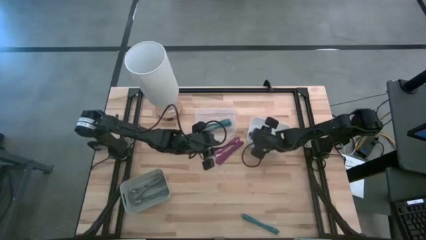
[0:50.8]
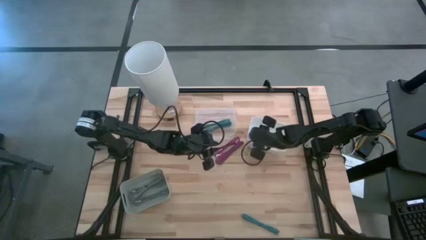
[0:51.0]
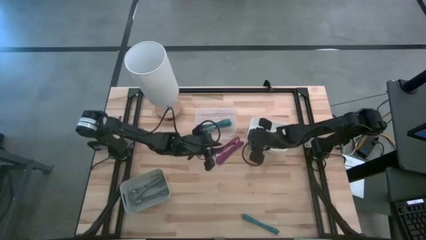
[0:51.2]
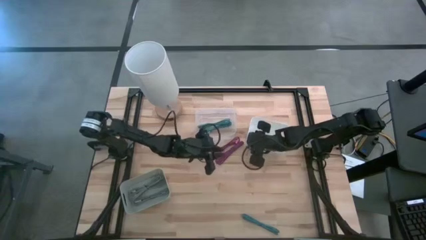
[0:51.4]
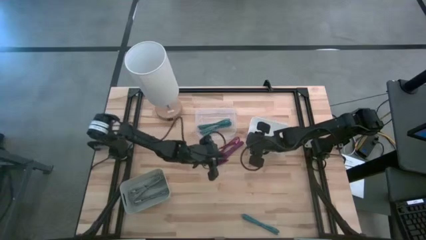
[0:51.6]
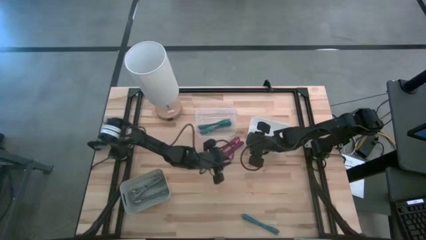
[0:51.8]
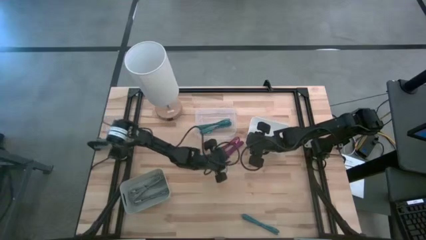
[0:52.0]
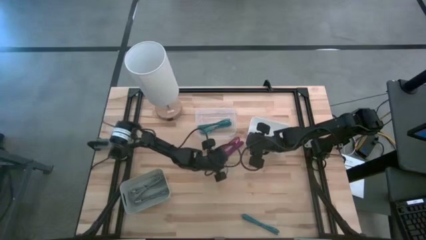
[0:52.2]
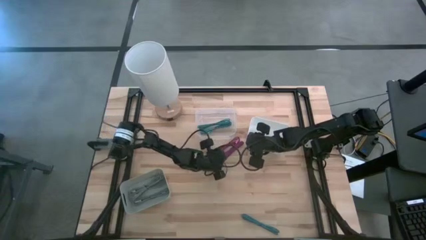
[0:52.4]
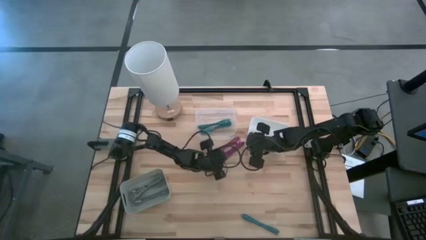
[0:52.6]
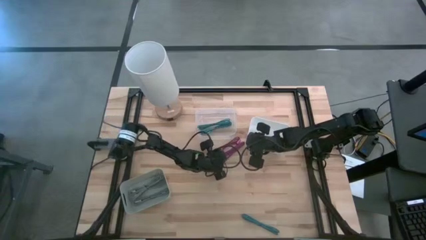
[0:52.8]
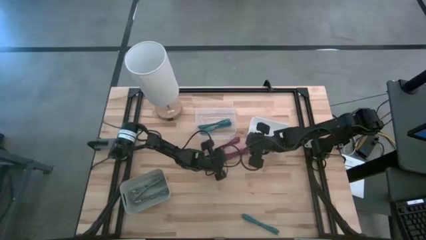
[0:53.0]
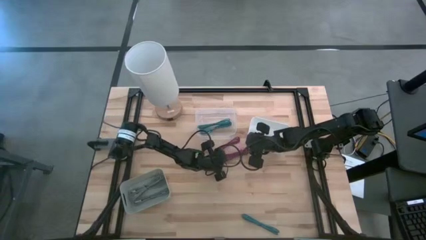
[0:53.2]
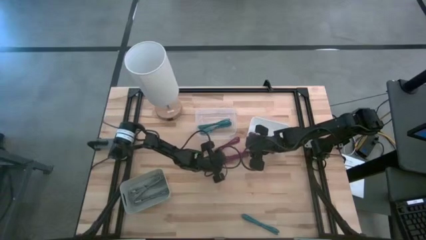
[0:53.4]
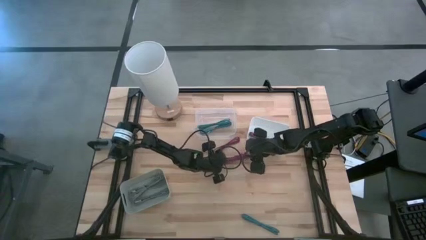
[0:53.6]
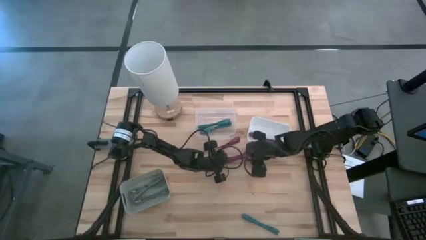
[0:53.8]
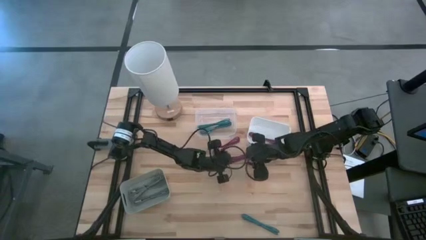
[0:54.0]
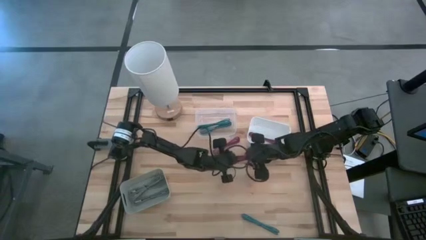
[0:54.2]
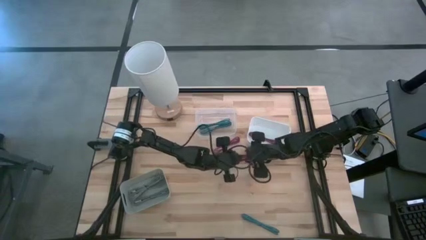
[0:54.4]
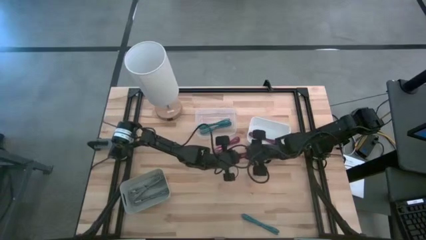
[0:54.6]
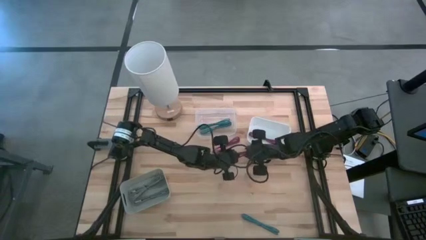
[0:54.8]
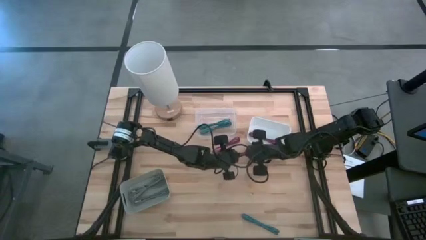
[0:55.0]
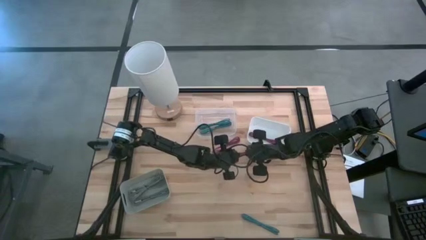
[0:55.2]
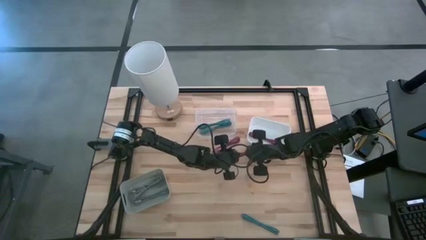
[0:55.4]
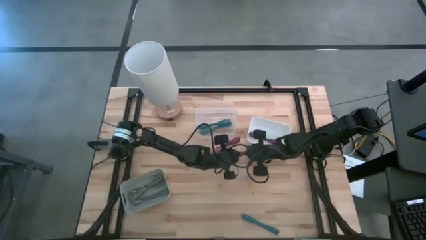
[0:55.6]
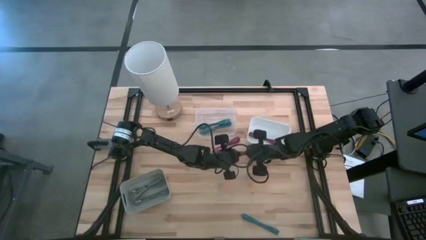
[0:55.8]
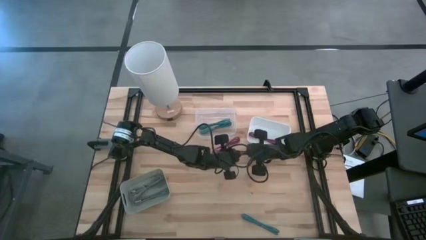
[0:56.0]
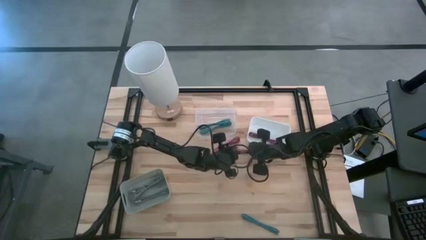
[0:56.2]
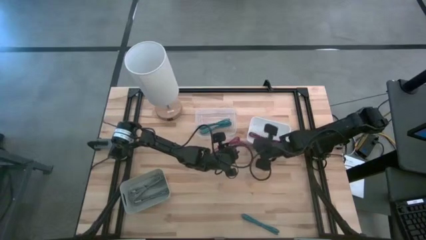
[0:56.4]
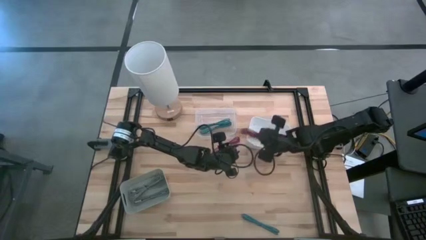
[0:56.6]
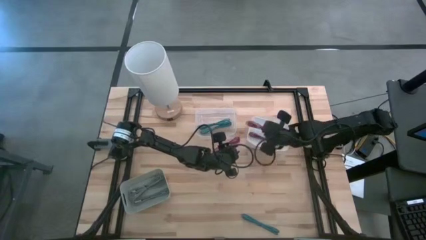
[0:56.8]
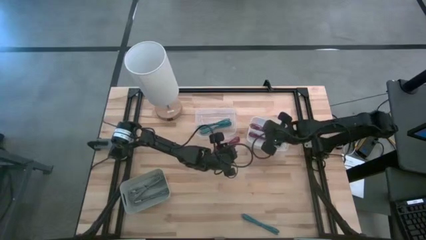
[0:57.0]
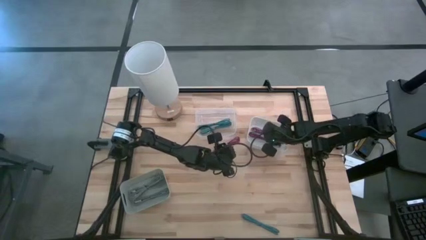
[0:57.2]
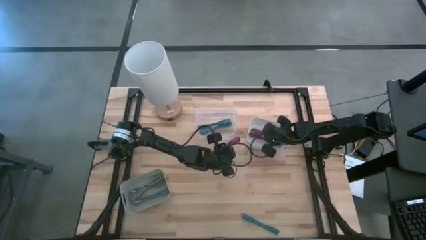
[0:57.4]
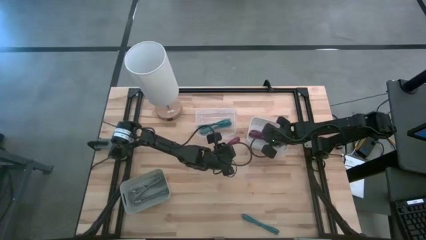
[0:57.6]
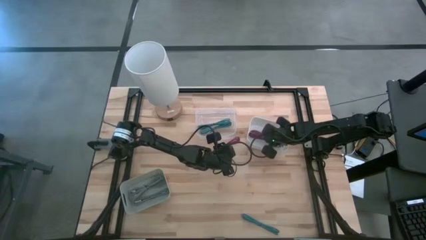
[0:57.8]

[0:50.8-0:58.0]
Task: Pick & Place USB Port
Put the bottom pink USB cable into the white bin

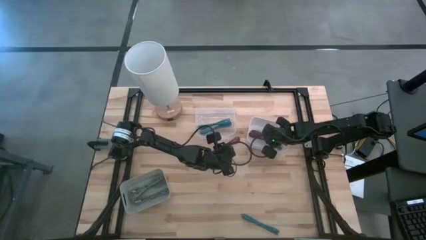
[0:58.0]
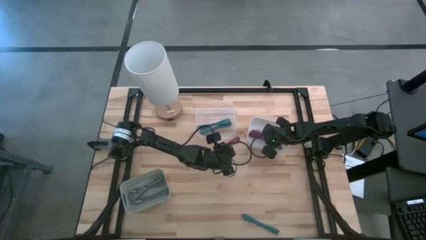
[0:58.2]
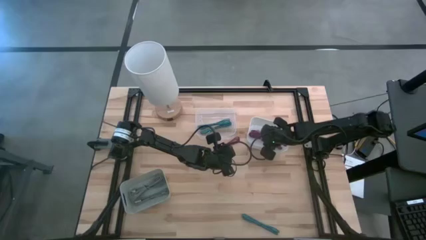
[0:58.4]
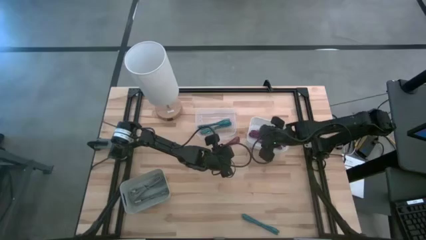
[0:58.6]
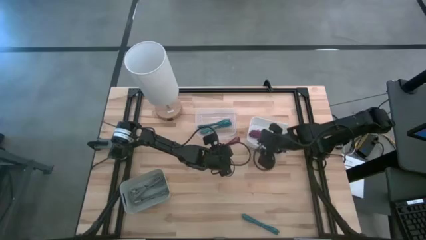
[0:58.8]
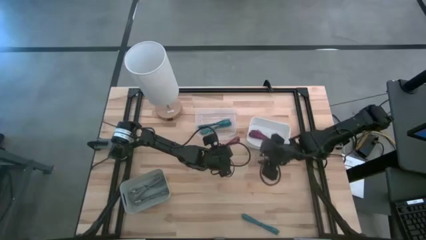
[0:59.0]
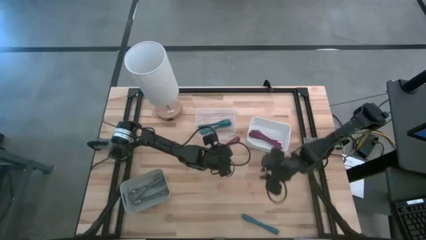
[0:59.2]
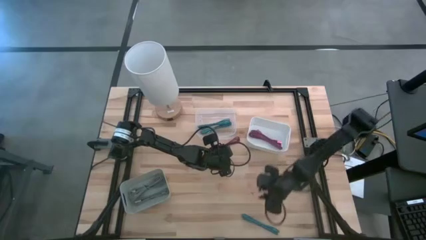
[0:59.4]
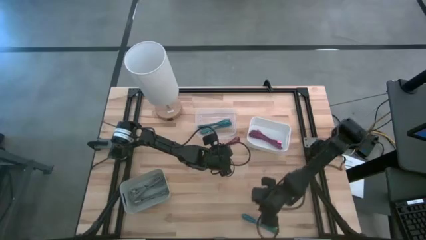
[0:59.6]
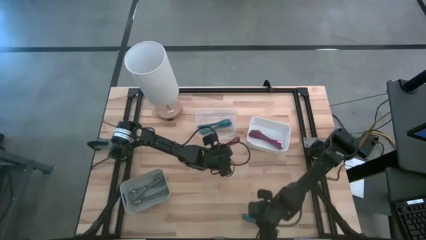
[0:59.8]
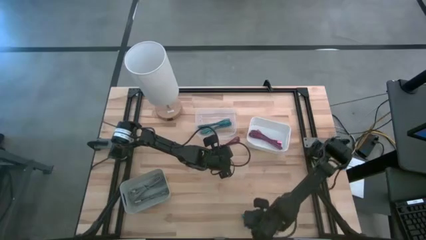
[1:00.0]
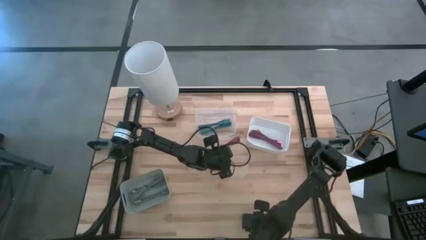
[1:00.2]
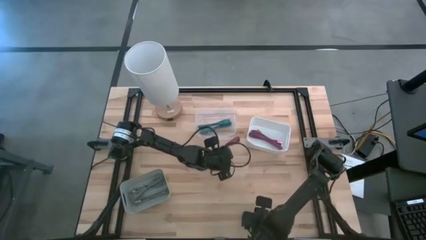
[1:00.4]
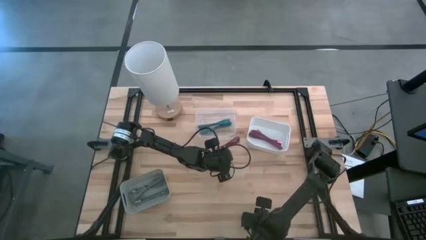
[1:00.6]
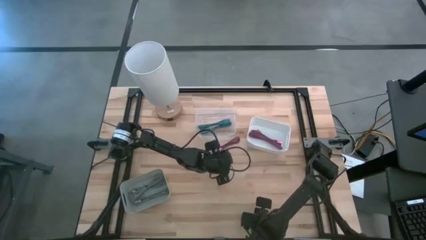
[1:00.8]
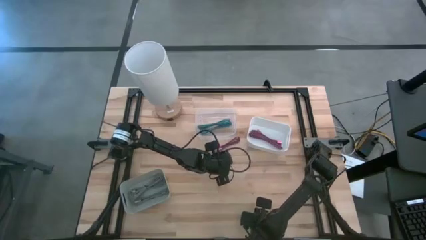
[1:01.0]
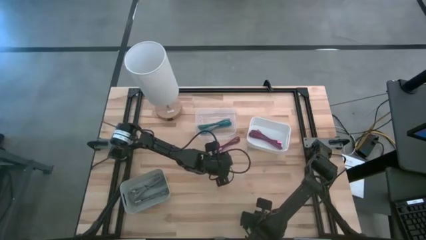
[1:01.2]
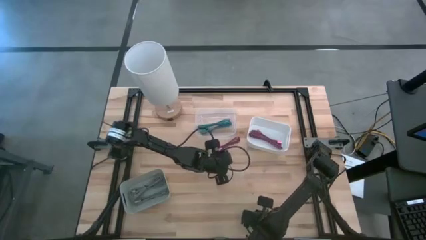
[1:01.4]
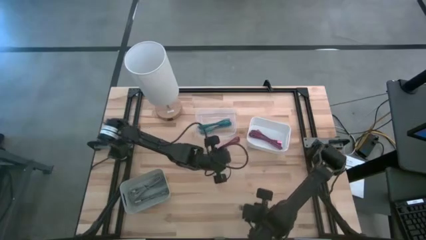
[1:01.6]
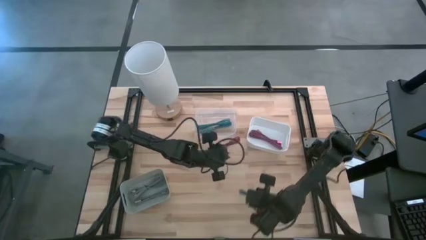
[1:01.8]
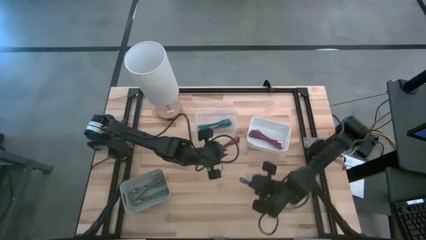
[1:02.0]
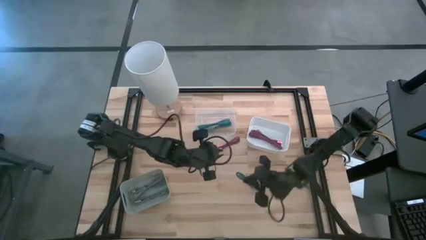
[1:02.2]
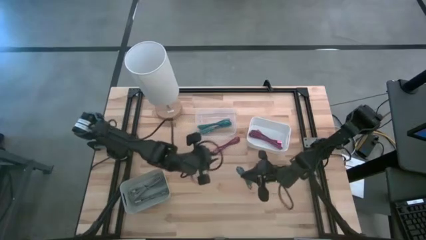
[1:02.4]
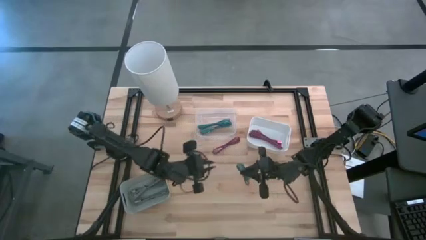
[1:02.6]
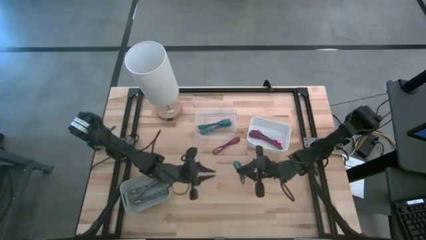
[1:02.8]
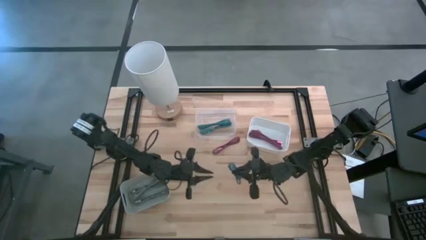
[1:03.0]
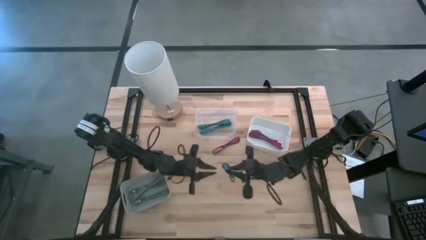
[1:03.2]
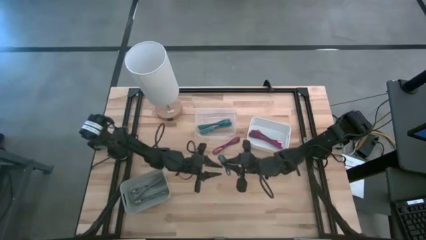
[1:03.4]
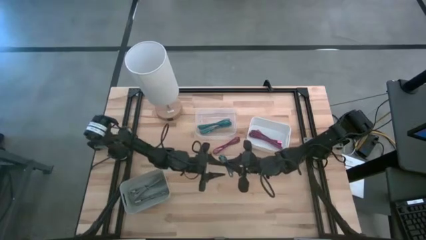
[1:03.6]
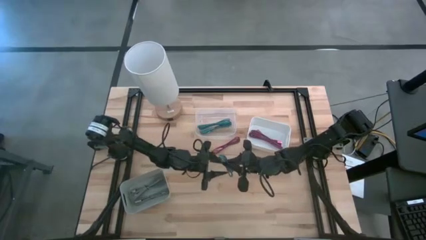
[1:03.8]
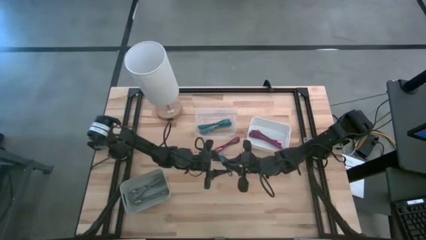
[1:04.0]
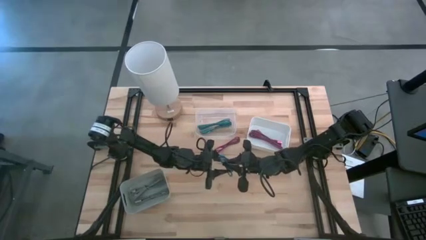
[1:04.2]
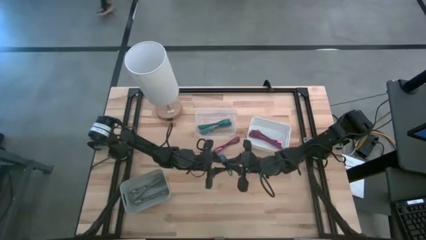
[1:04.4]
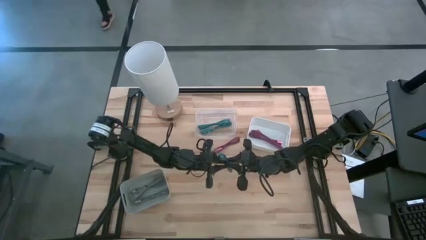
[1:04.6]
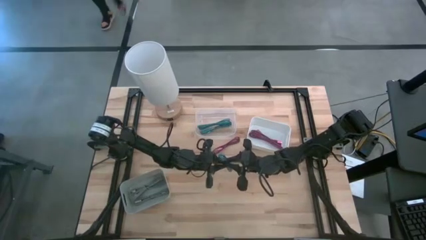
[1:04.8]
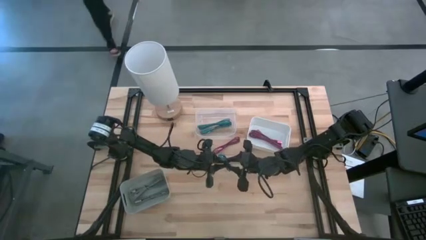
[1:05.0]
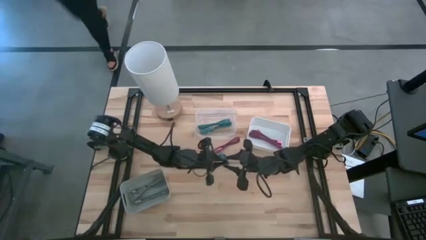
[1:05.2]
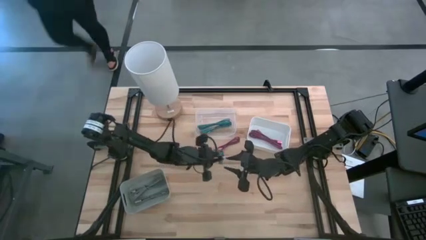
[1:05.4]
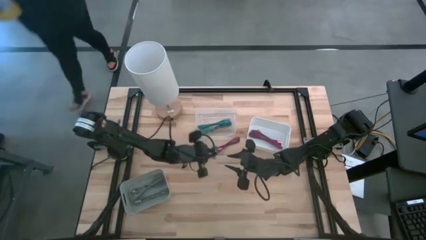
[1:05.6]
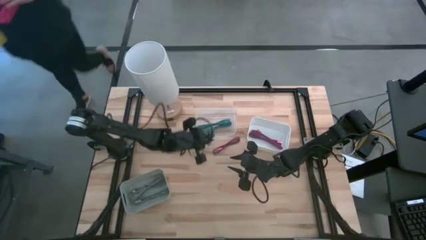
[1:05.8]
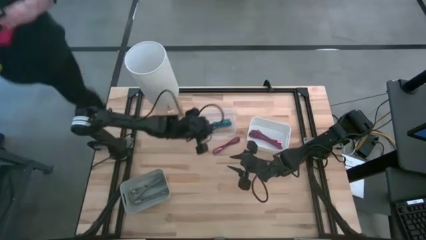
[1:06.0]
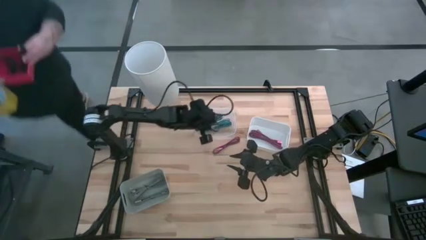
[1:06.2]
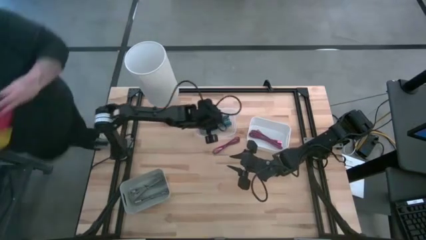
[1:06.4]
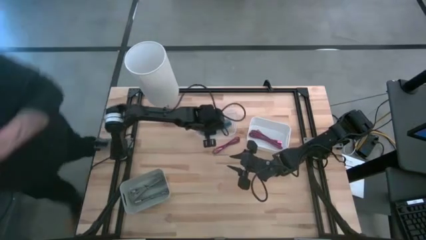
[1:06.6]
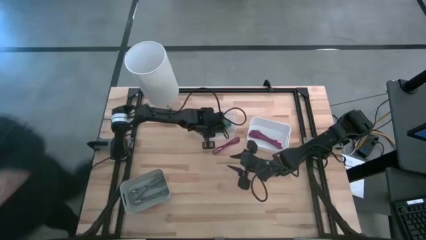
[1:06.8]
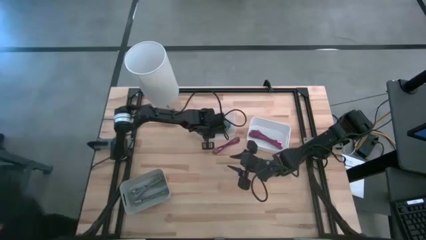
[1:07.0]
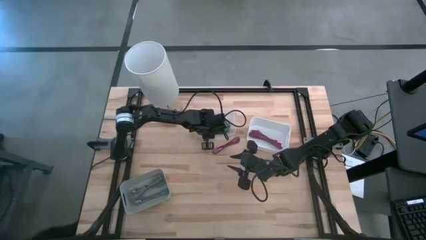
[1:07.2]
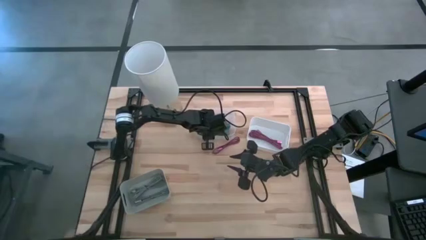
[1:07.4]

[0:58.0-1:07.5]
Put the blue USB cable into the transparent bin
